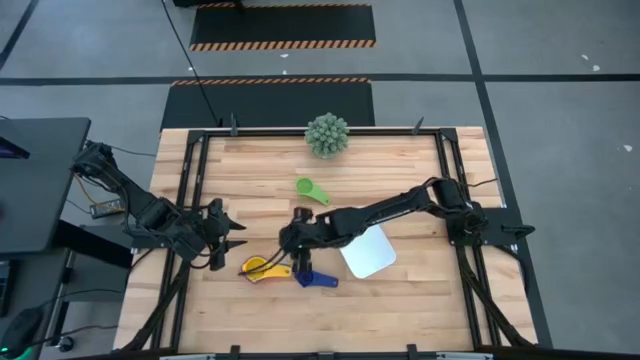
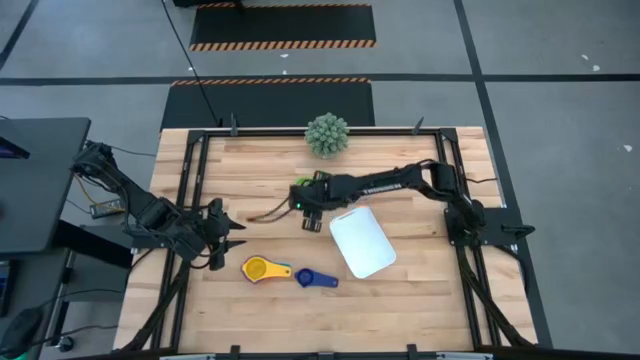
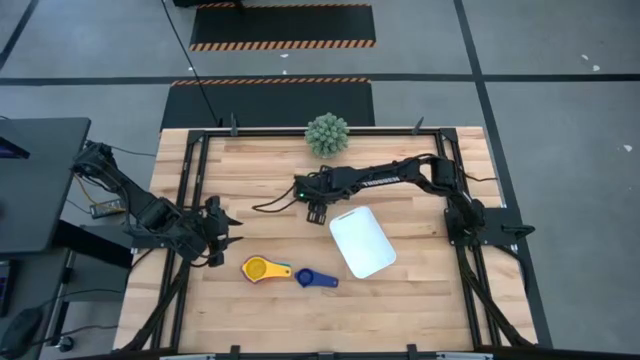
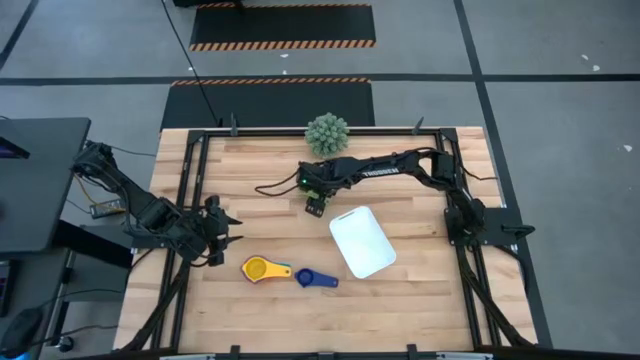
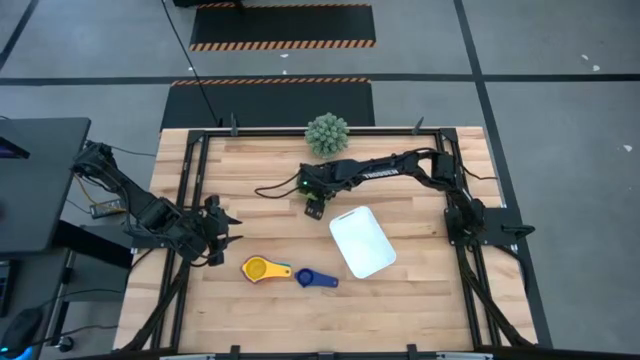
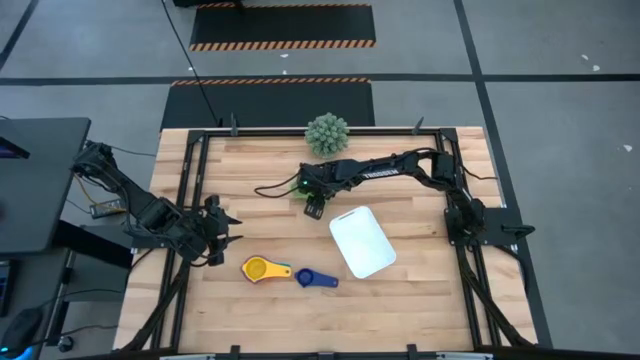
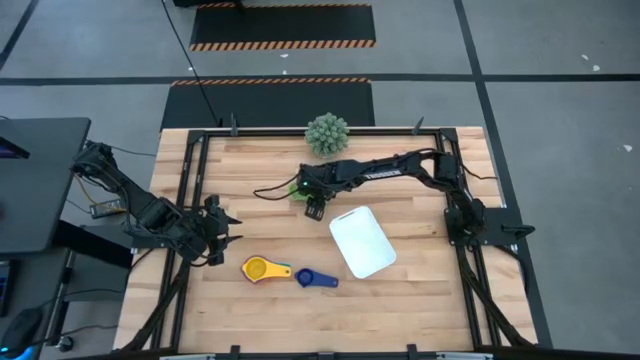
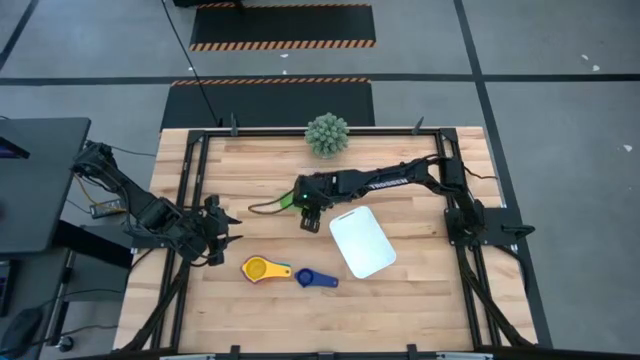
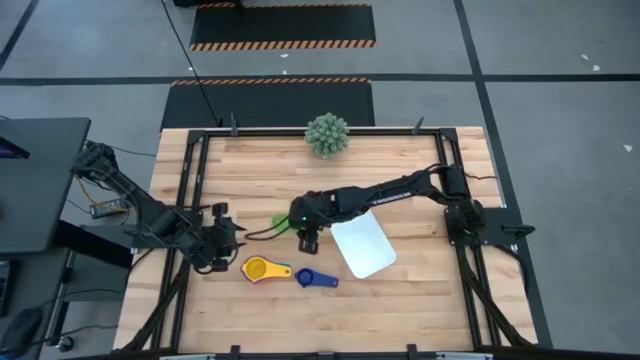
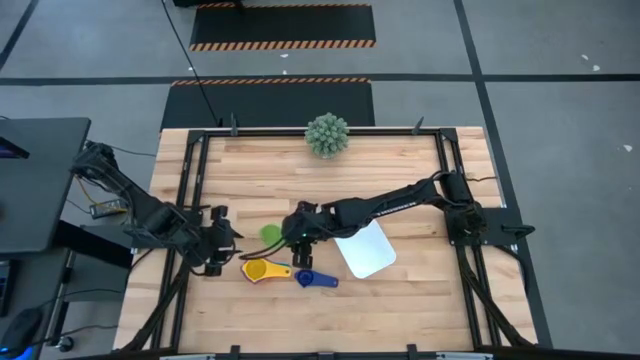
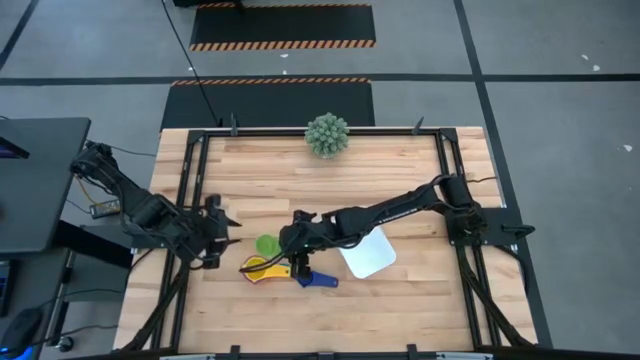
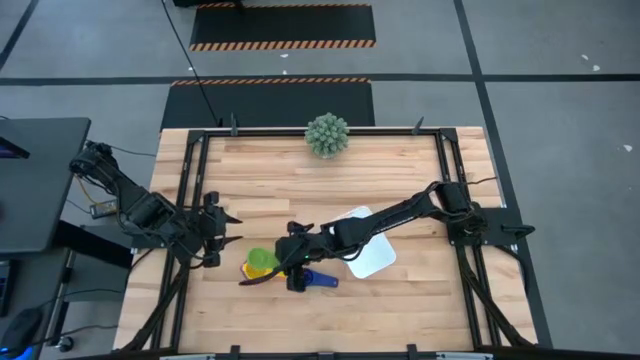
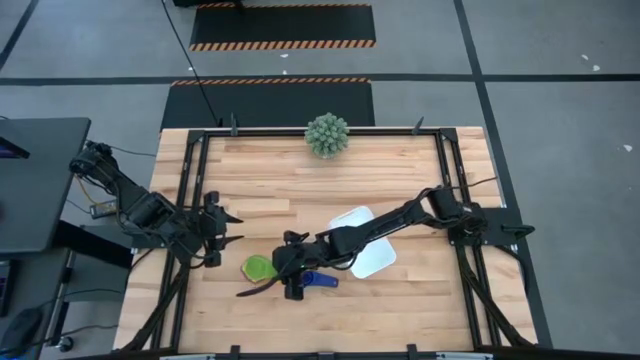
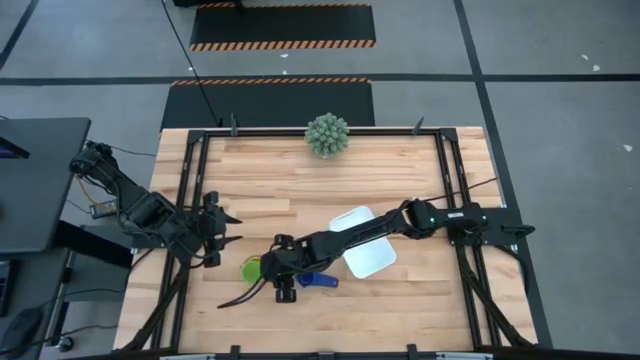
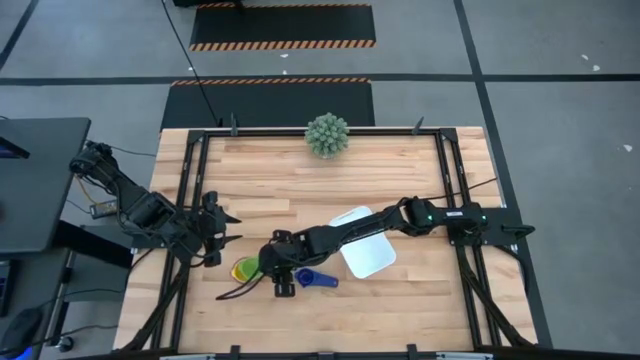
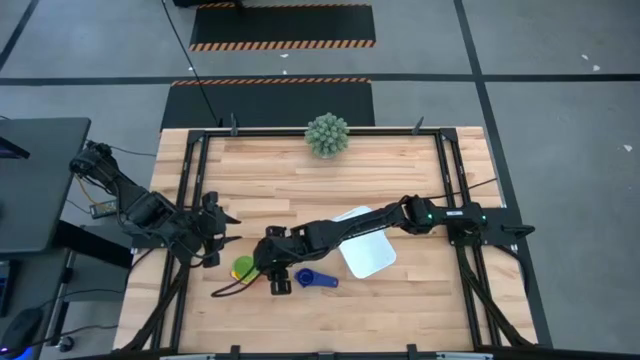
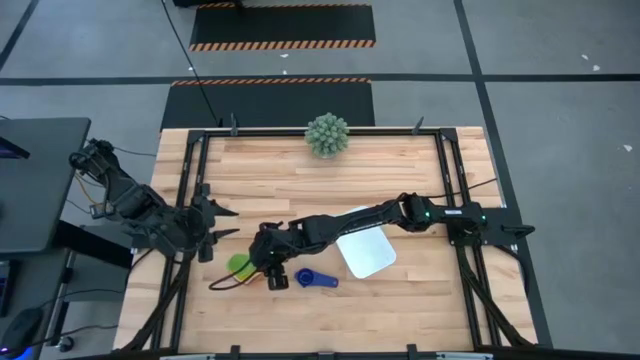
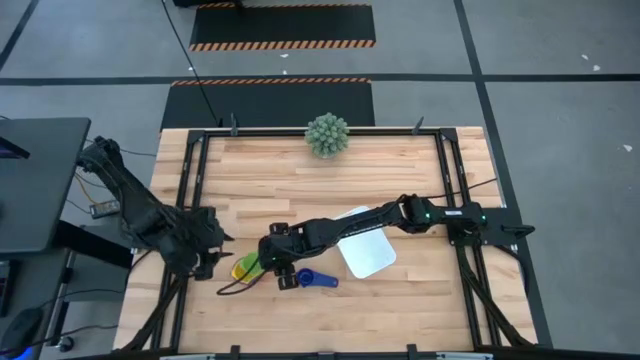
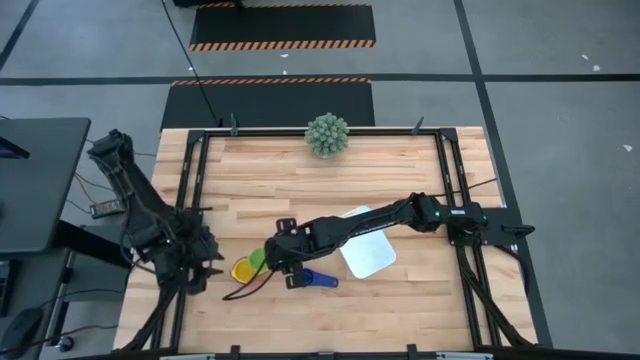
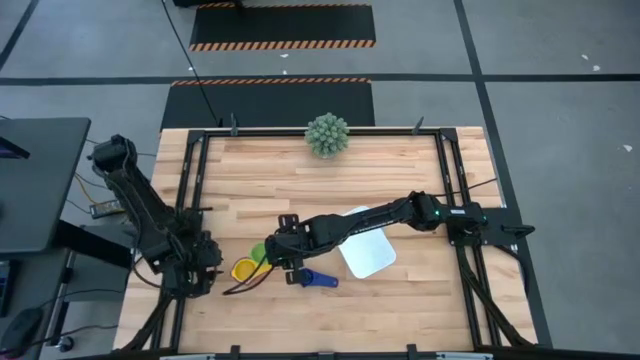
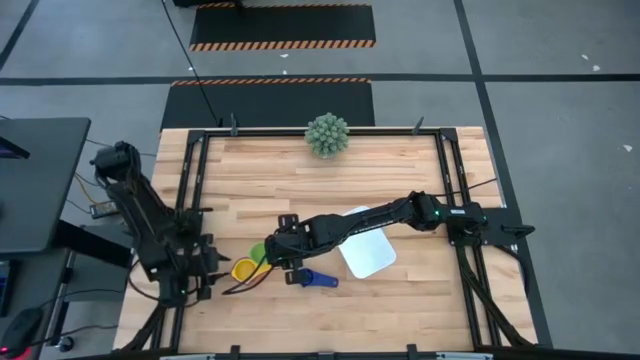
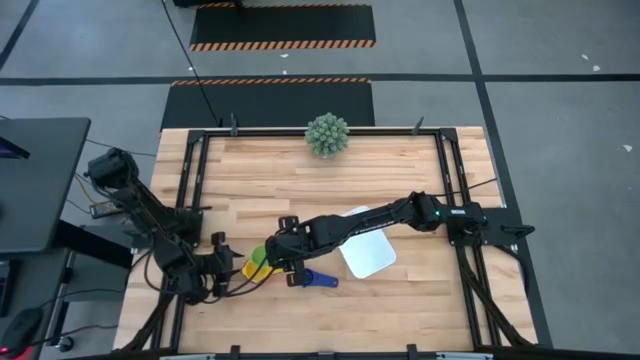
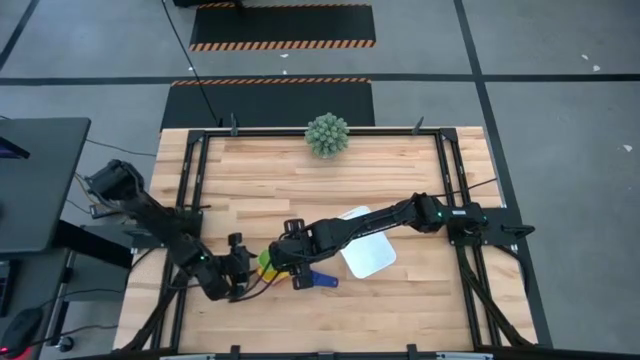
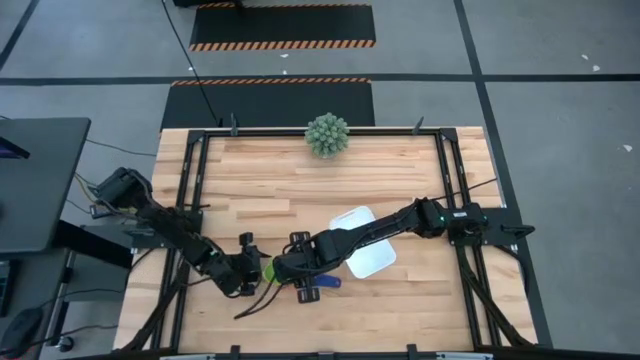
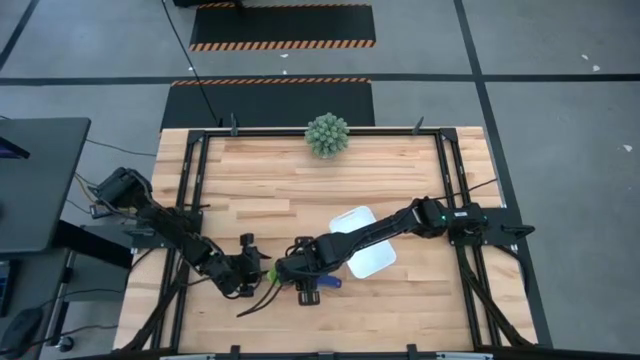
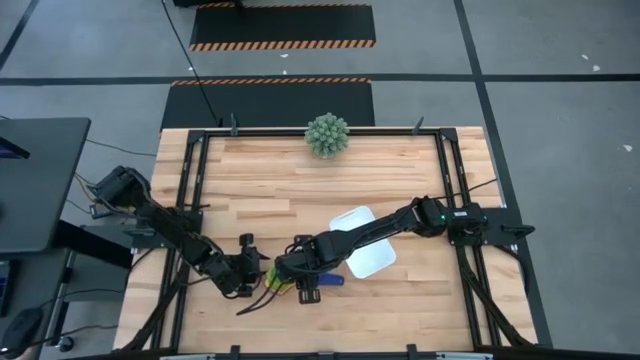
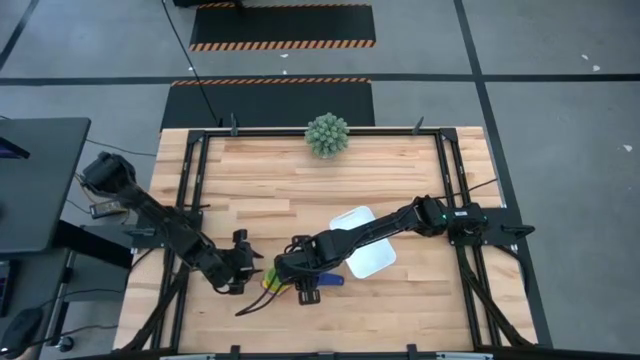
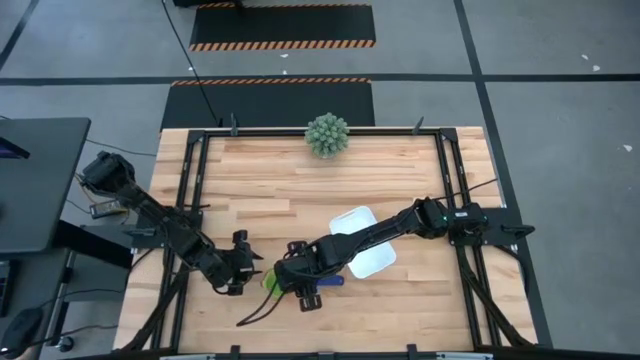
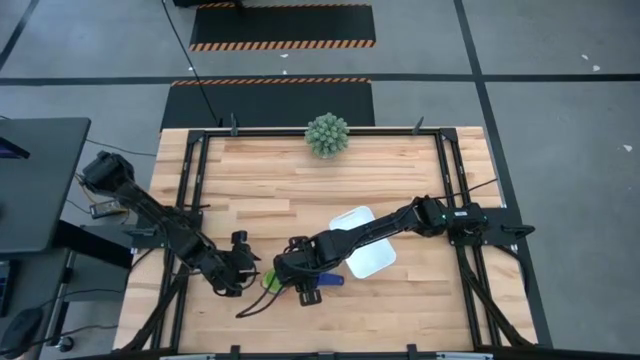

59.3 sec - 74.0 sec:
Task: Nest measuring cups in basket
Stack the green measuring cup on top of the yellow measuring cup

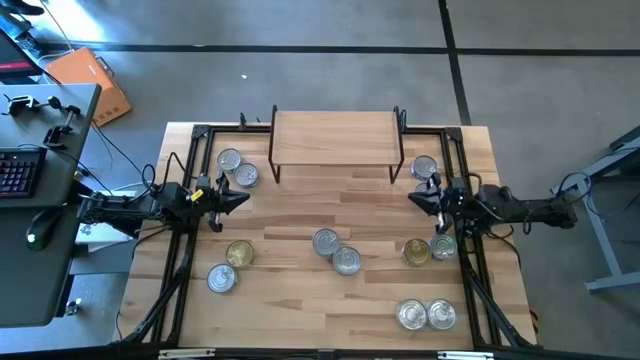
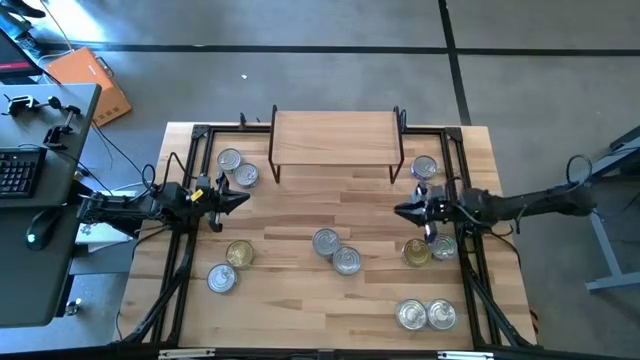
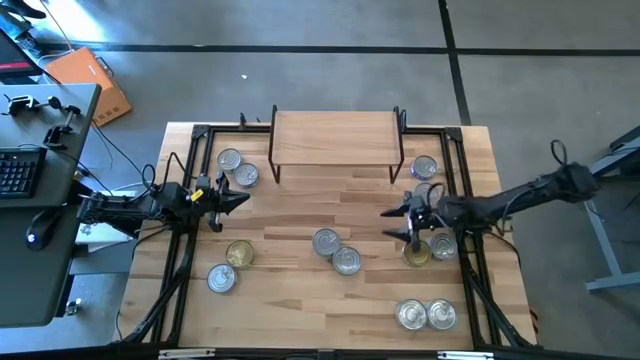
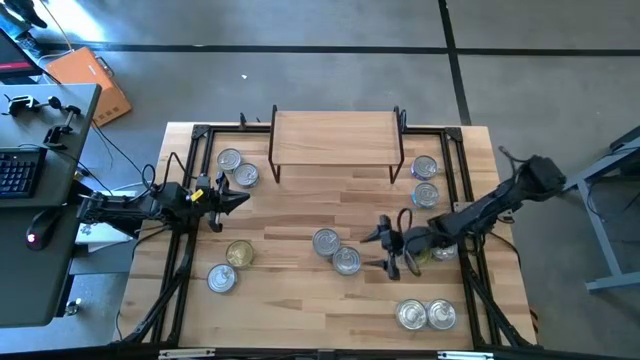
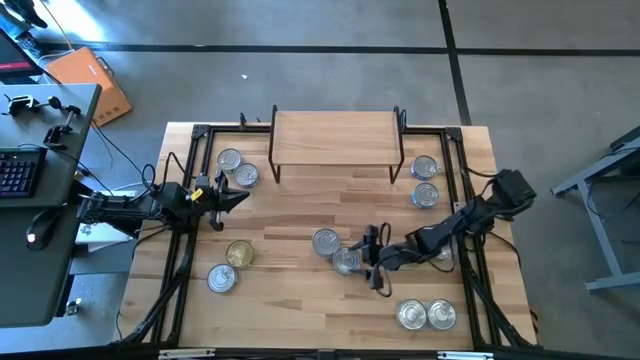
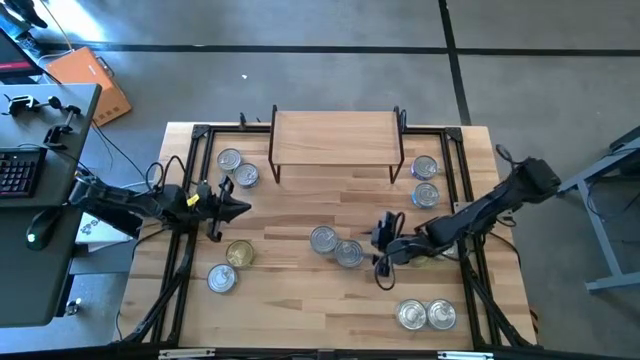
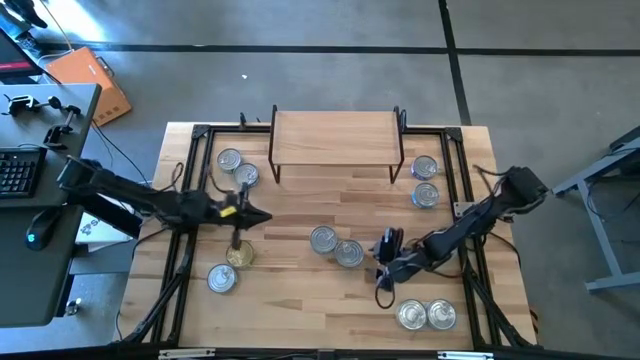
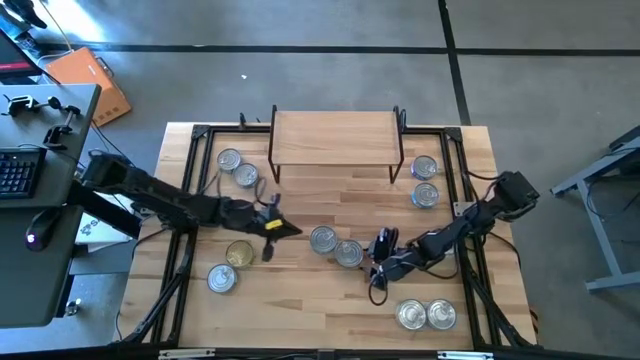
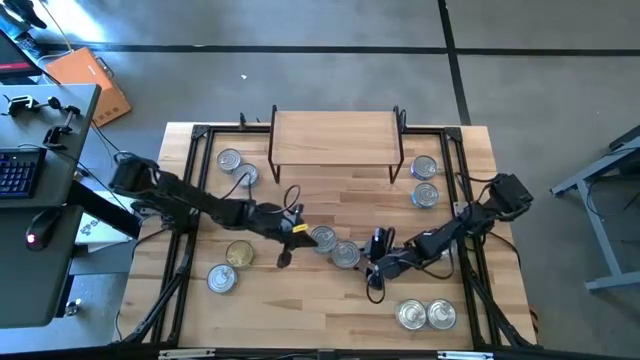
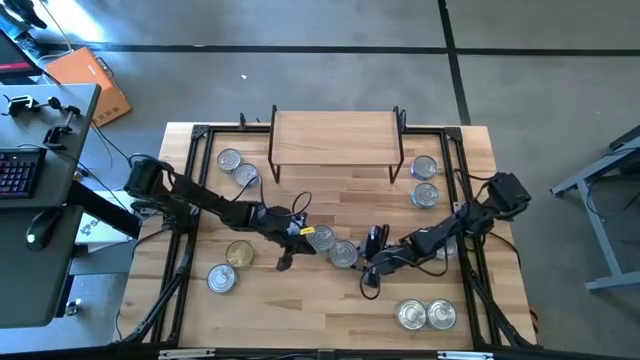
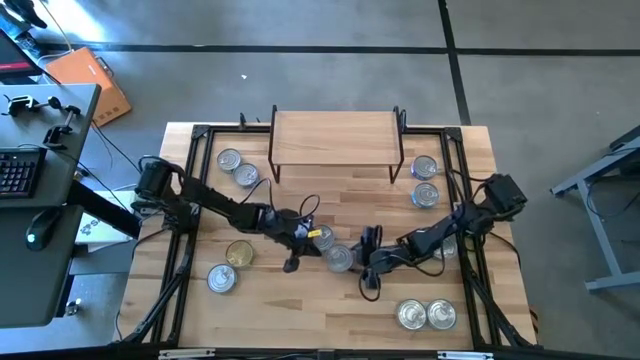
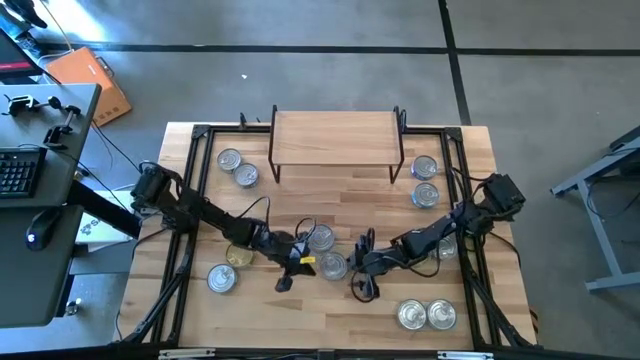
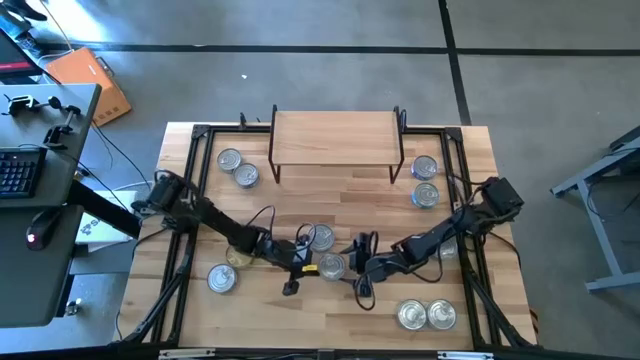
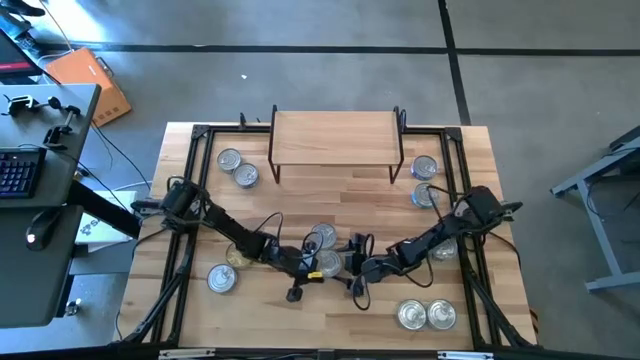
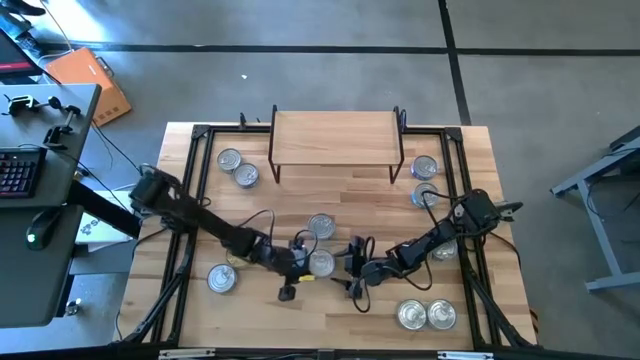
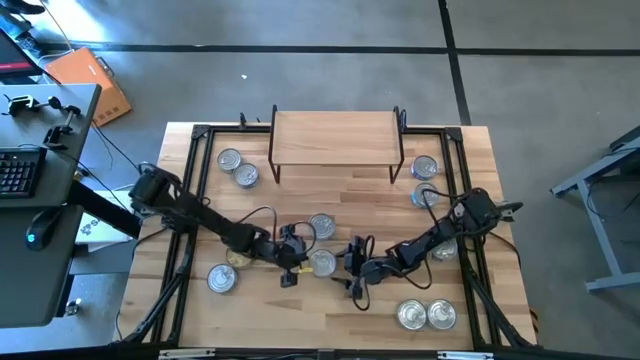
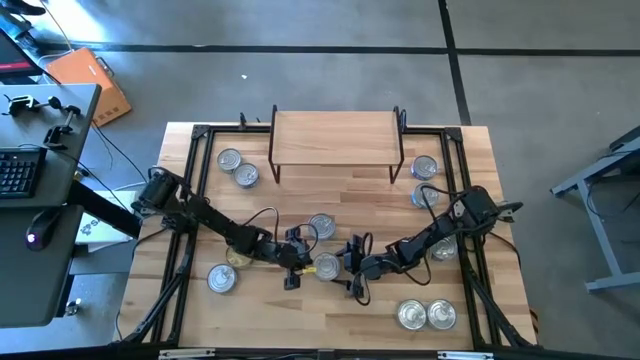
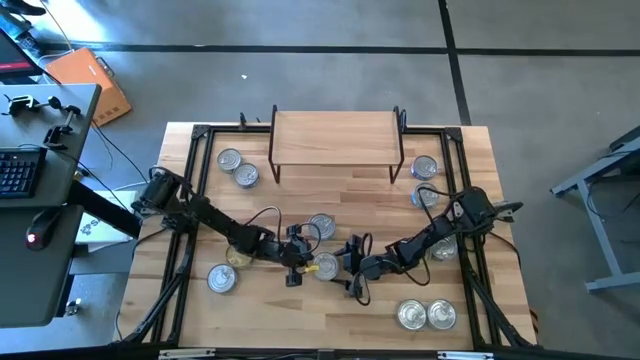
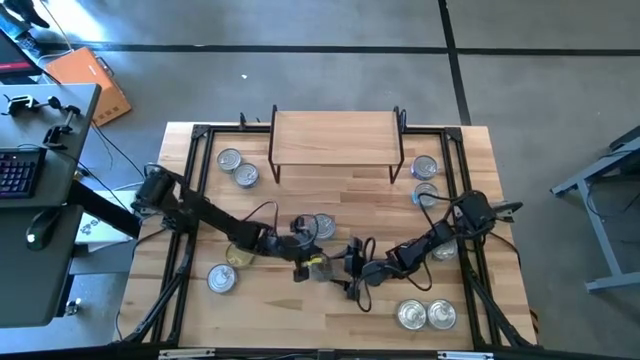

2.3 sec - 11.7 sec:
Task: Stack canned seafood by type on shelf
Put the green tuna can on the shelf
